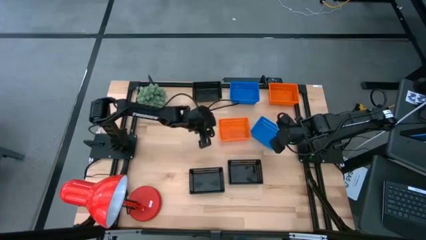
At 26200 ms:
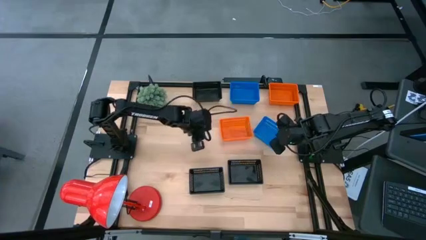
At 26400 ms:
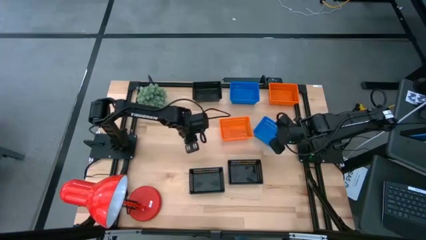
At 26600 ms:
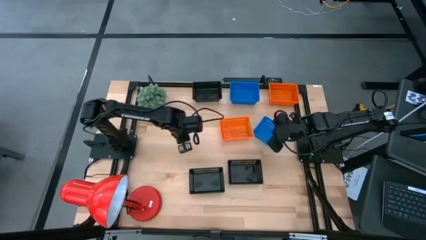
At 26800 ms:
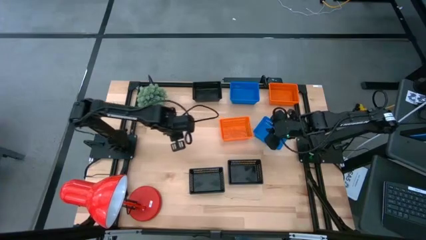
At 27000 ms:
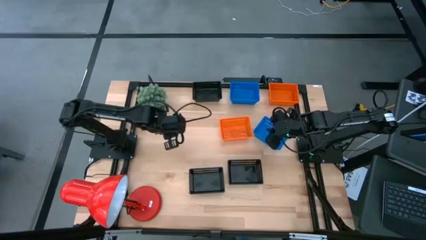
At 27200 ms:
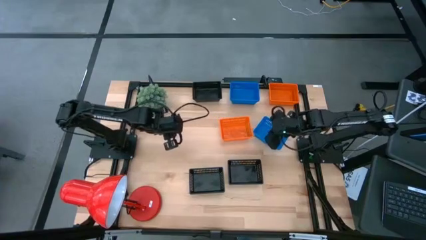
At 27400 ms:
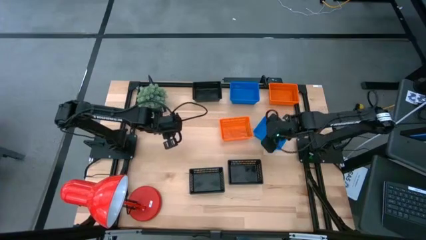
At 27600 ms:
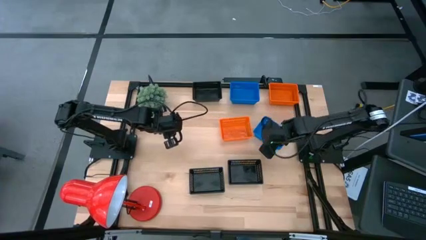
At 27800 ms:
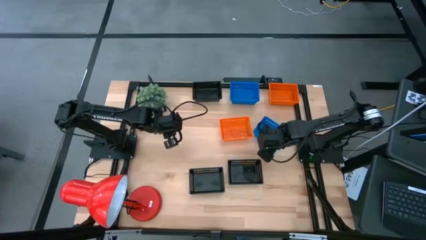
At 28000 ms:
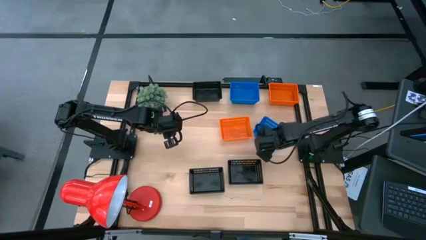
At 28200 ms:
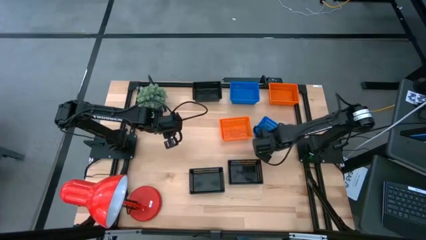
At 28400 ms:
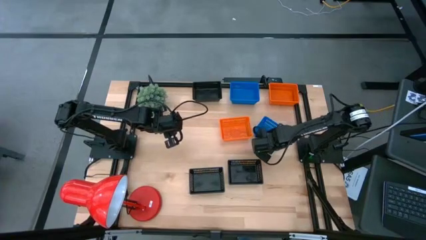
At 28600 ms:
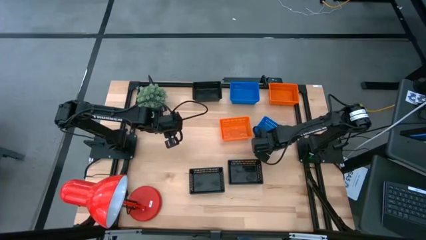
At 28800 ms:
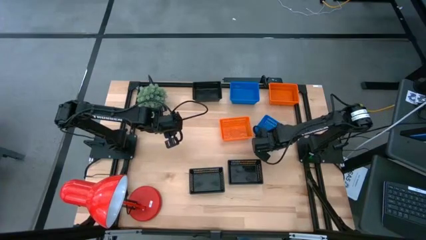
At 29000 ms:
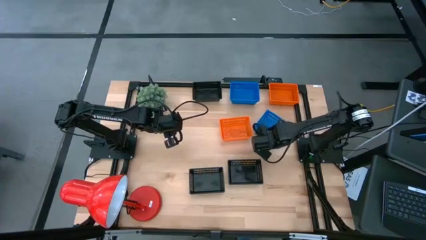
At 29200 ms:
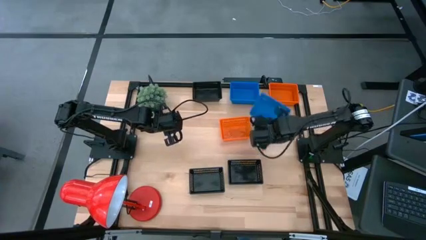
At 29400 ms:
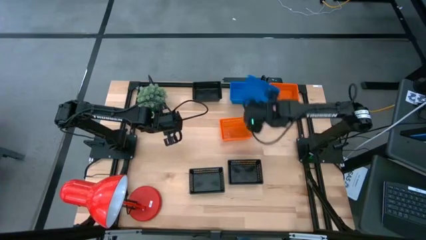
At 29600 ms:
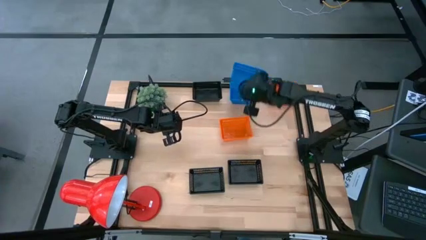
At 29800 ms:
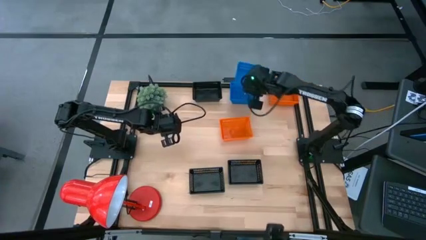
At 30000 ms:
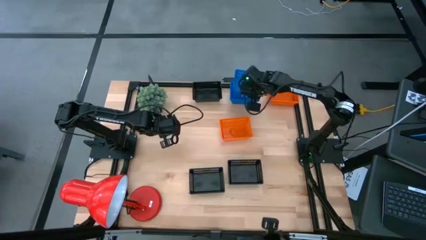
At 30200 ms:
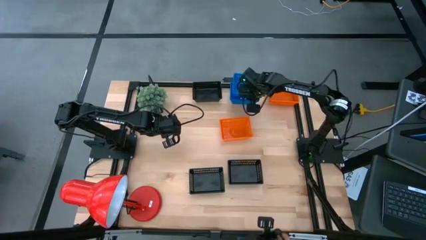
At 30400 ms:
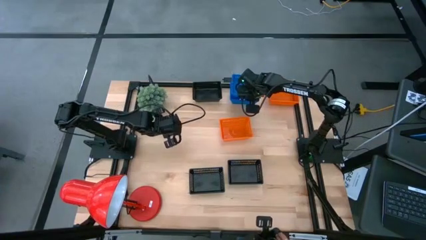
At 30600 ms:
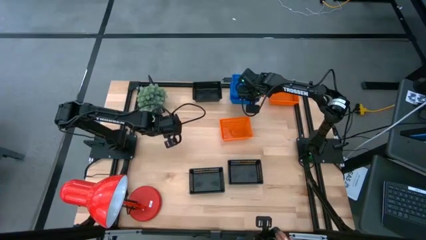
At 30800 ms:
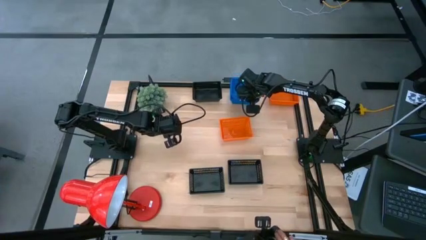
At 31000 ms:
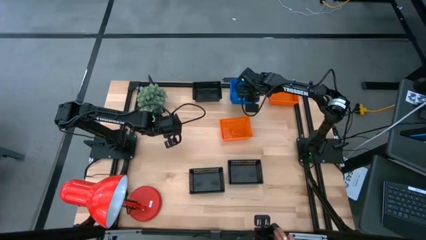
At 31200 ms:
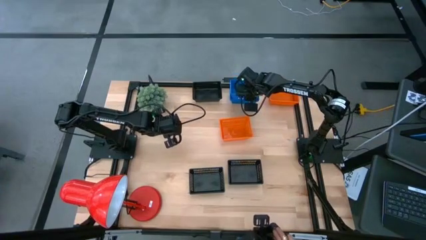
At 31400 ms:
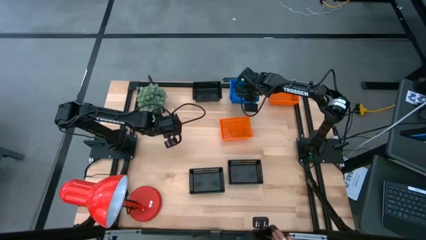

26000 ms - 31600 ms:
Stack the bottom blue bin on the top blue bin

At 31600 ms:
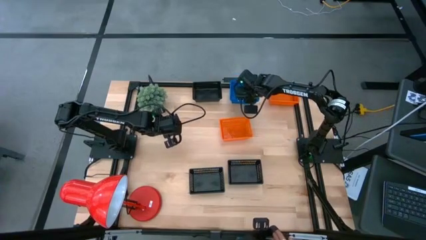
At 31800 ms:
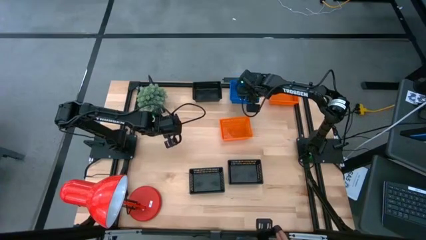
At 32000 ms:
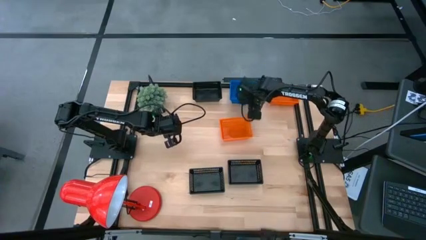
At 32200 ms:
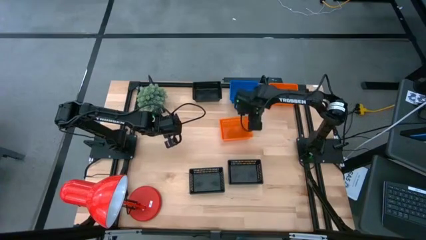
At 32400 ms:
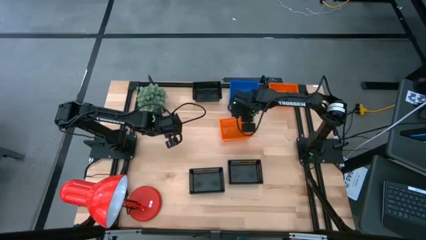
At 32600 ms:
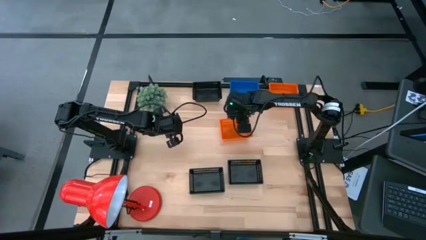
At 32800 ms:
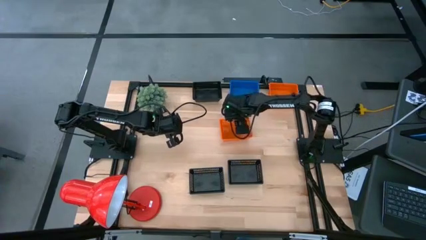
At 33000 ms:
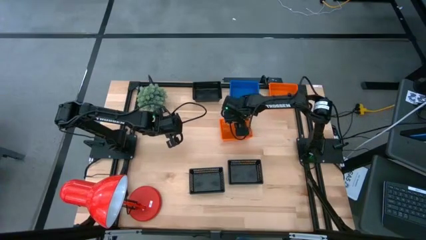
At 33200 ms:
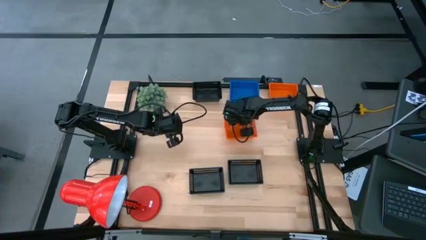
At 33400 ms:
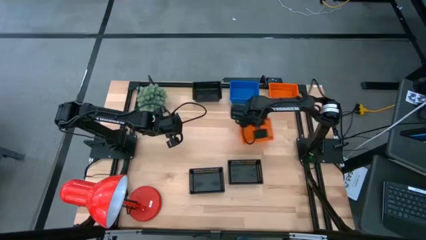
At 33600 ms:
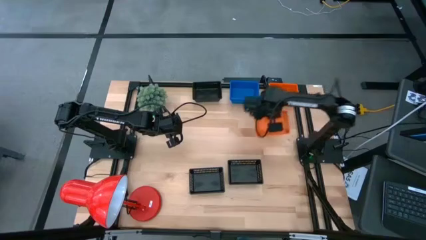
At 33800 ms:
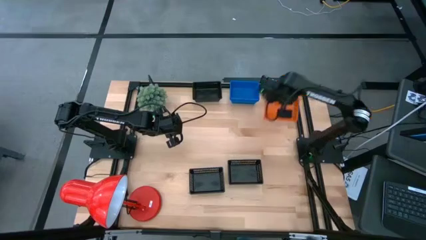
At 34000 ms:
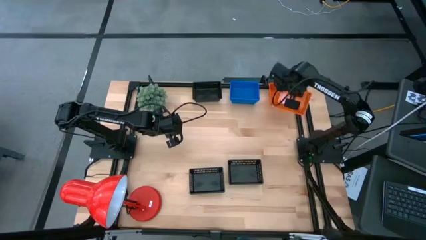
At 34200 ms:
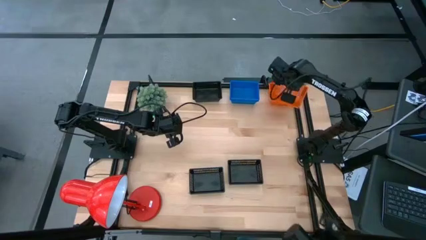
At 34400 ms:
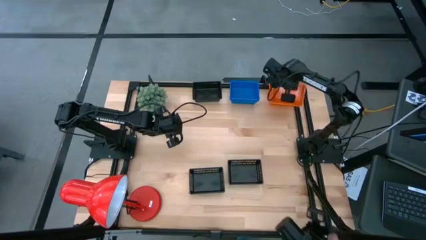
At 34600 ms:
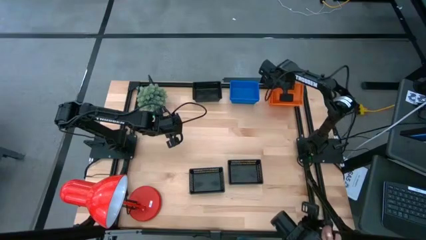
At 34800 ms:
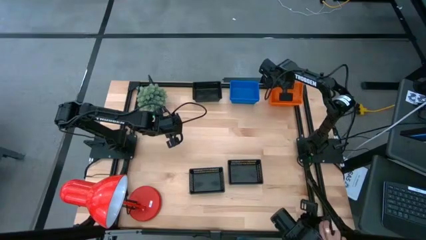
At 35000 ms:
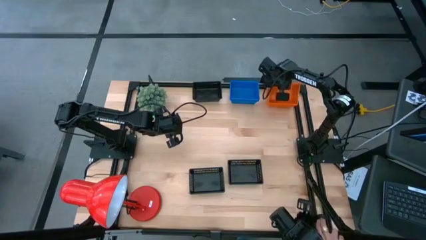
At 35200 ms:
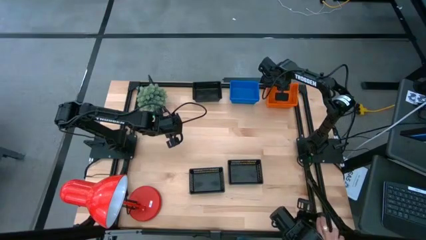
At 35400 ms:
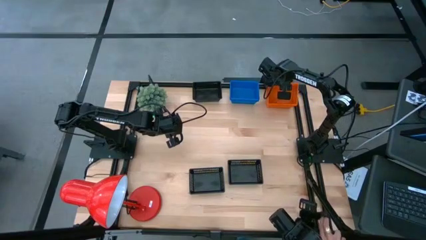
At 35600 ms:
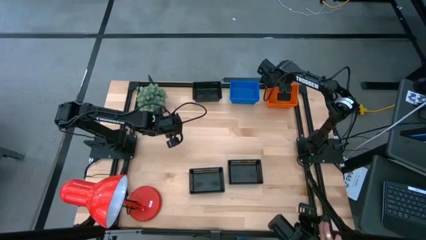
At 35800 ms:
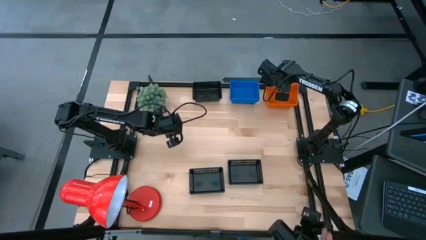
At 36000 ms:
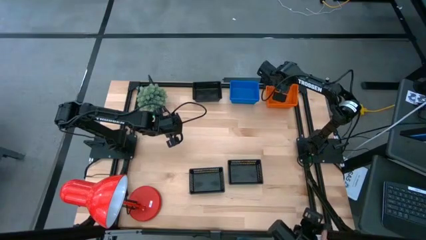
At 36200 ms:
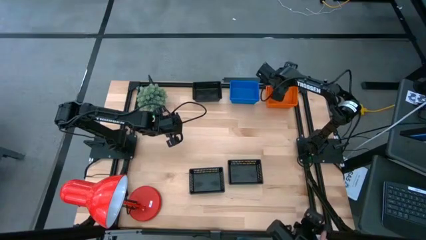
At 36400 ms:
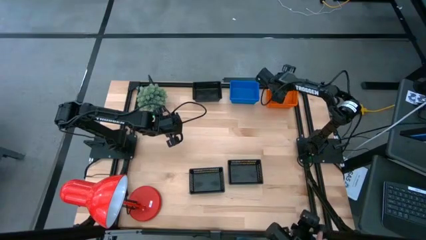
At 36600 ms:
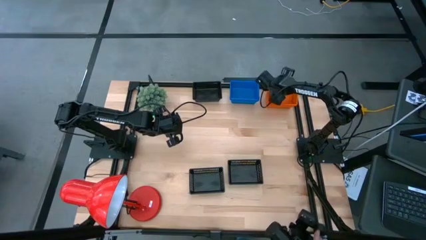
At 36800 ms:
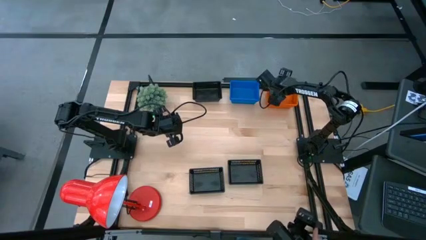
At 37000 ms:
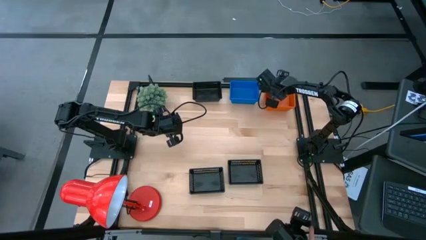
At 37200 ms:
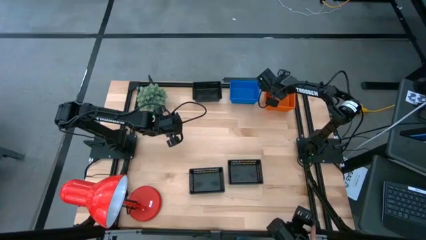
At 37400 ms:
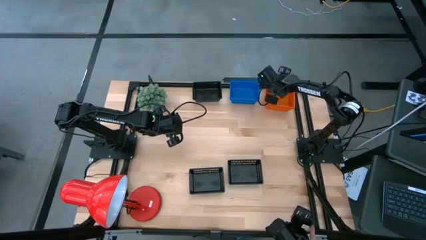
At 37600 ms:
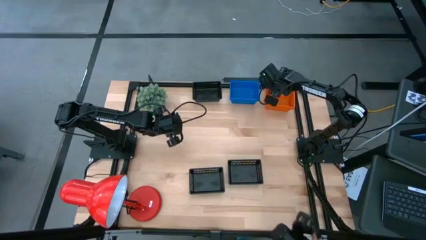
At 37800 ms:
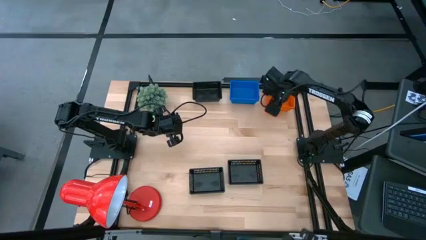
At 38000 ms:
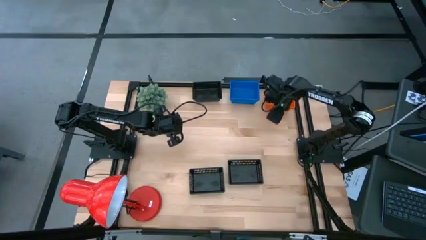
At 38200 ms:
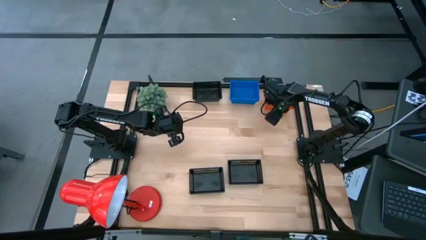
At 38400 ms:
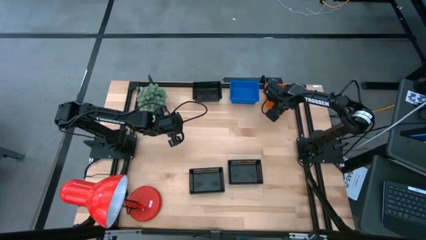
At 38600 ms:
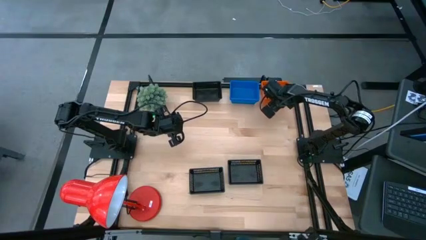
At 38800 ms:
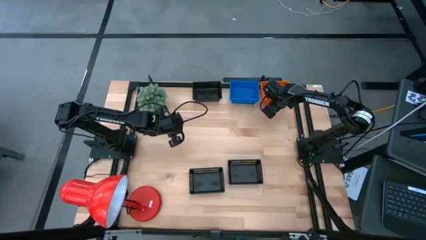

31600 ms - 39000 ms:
Stack the bottom orange bin on the top orange bin

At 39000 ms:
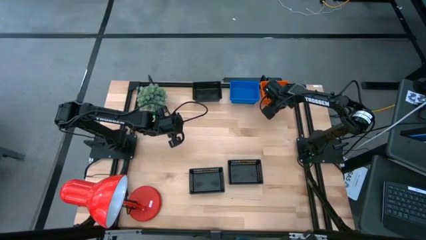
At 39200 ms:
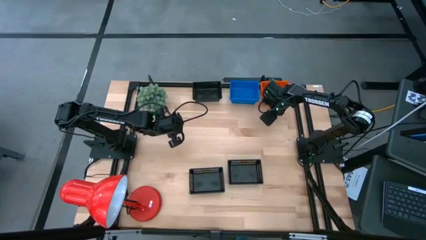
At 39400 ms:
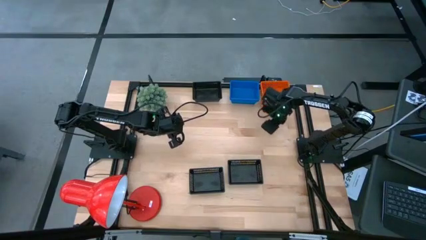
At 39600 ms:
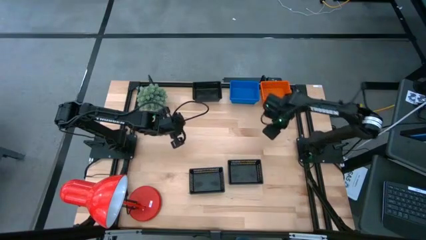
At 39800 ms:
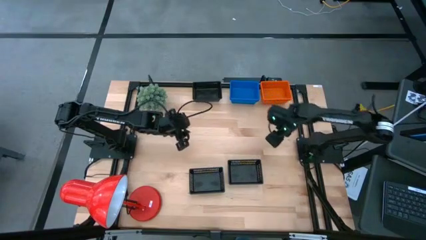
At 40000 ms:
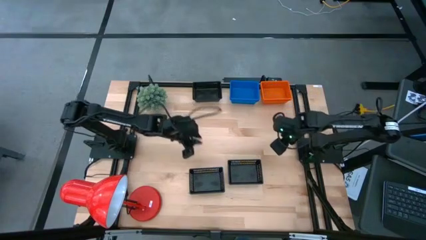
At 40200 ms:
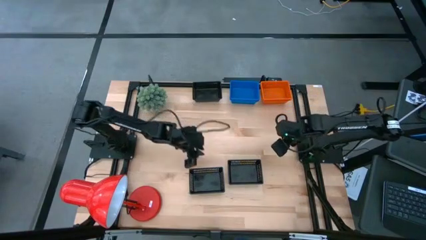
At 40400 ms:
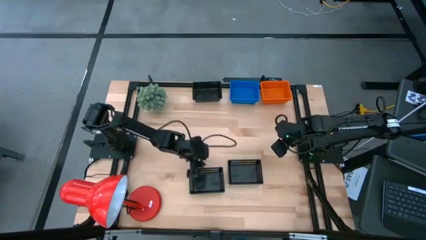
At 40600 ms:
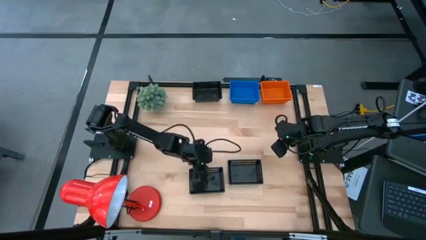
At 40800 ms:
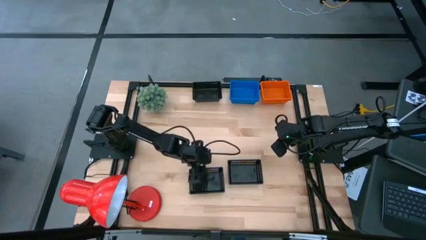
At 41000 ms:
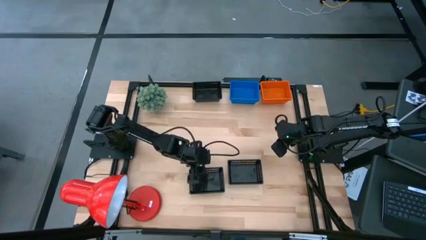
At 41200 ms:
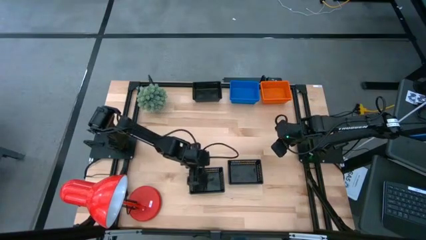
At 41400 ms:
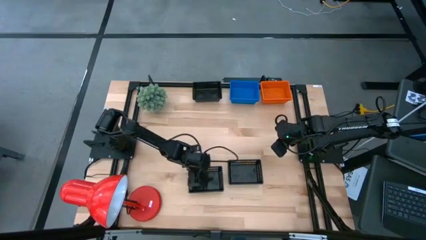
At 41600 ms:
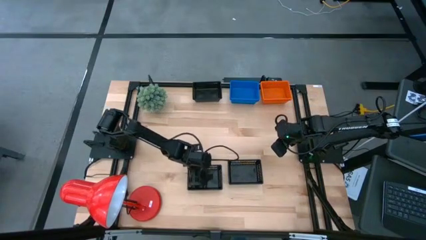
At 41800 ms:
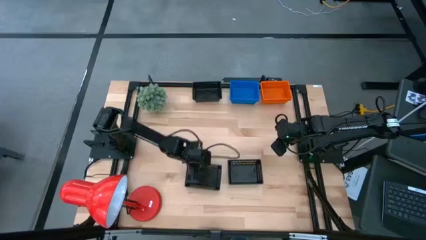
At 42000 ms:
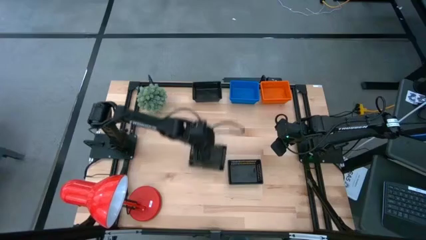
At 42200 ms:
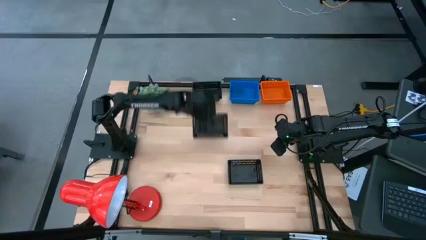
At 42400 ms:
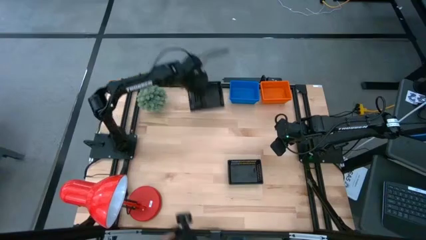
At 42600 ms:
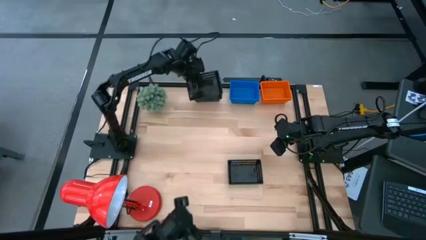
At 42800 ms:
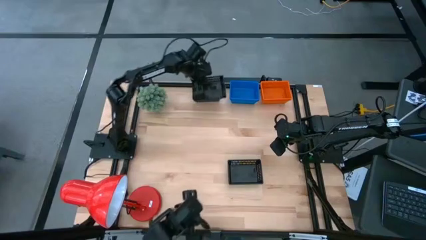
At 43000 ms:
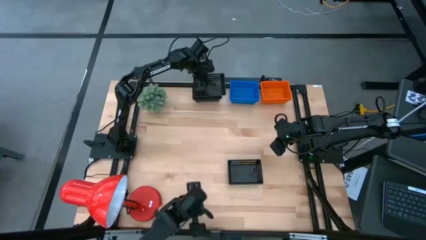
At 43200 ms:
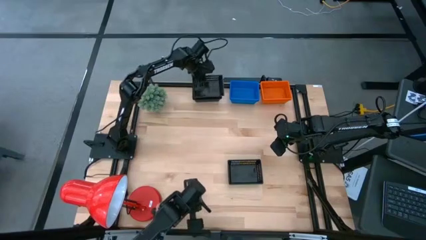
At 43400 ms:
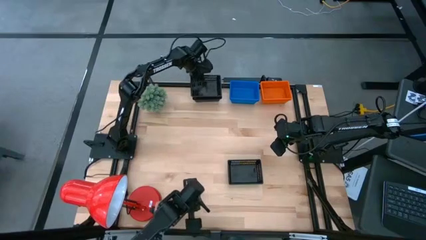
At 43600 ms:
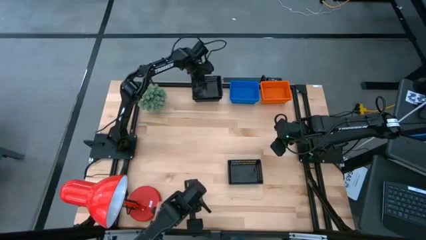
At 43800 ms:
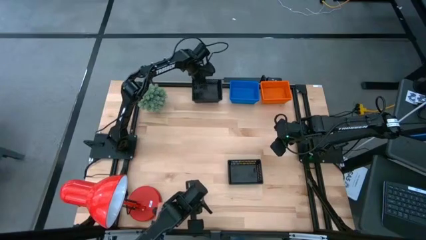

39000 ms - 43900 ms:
Stack the left black bin on the top black bin
